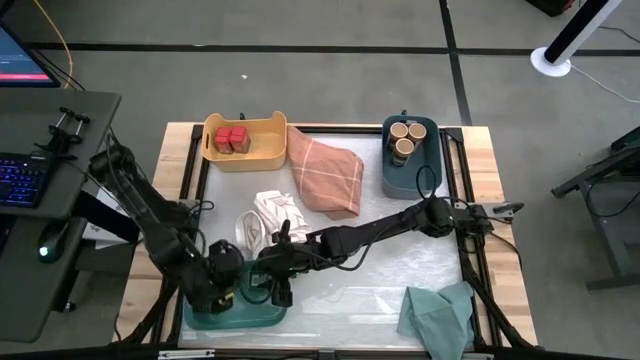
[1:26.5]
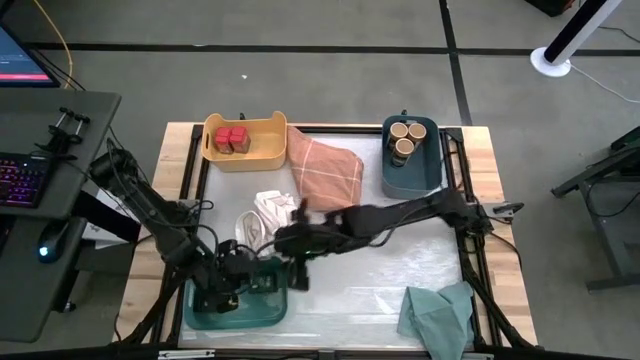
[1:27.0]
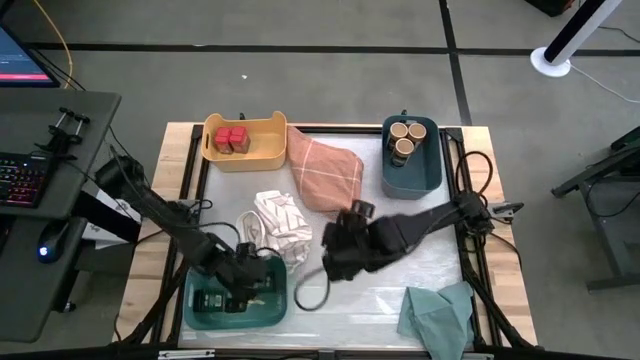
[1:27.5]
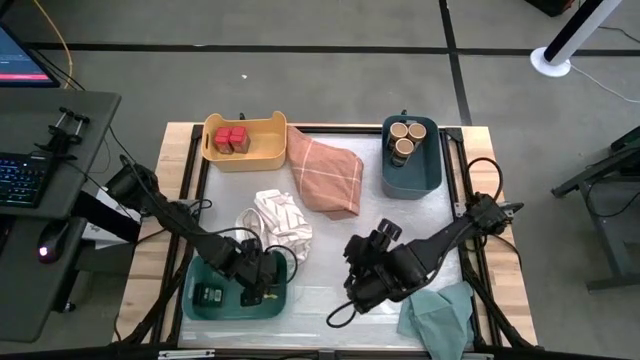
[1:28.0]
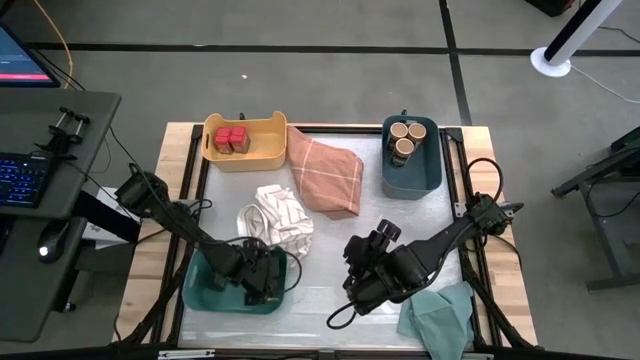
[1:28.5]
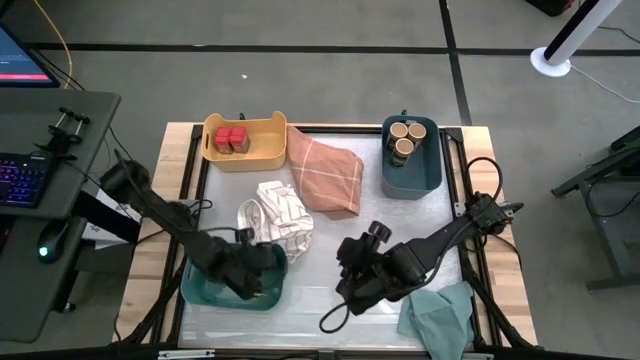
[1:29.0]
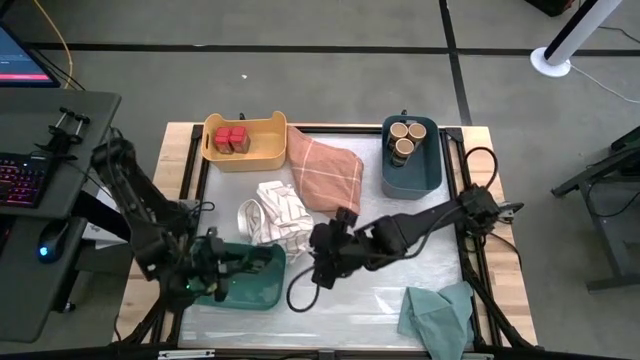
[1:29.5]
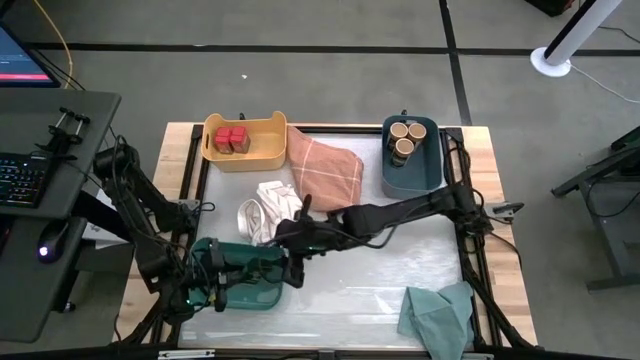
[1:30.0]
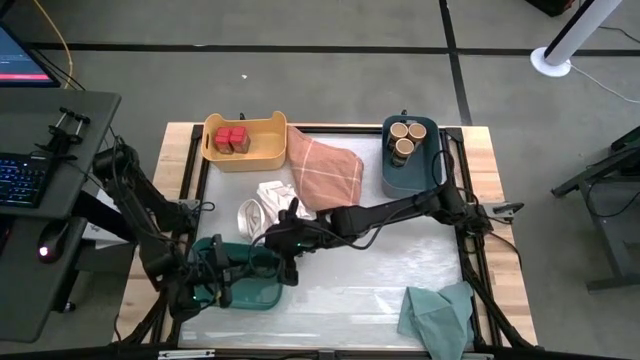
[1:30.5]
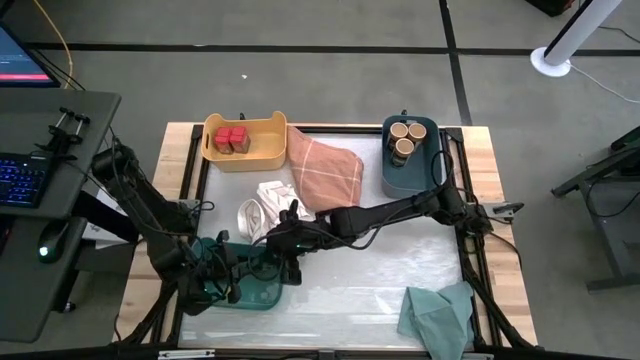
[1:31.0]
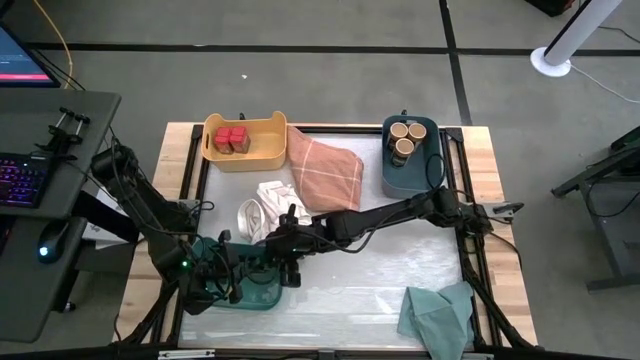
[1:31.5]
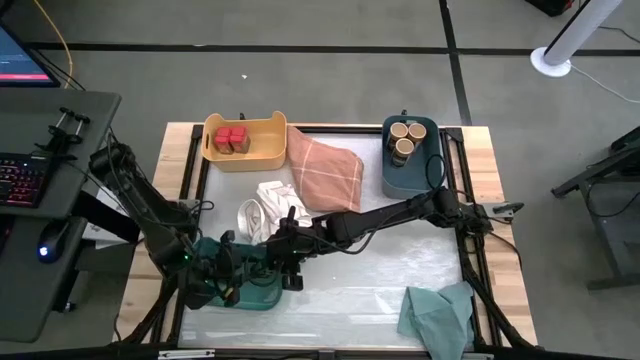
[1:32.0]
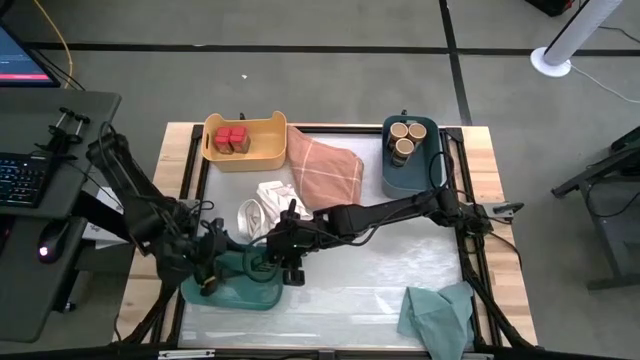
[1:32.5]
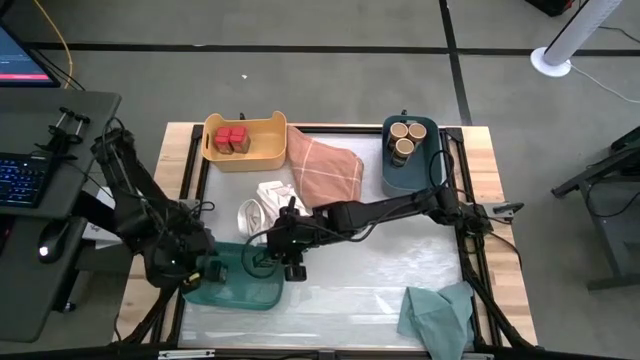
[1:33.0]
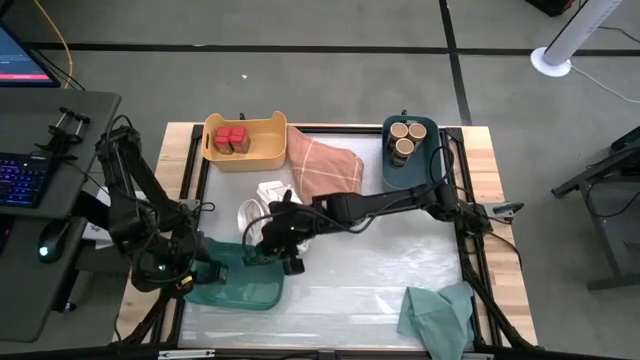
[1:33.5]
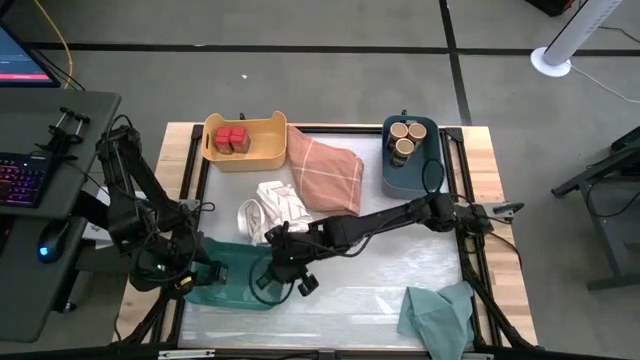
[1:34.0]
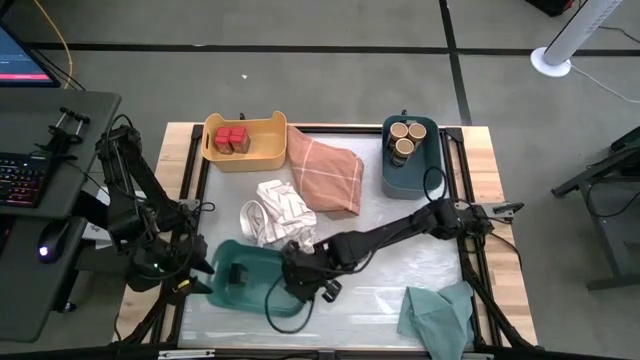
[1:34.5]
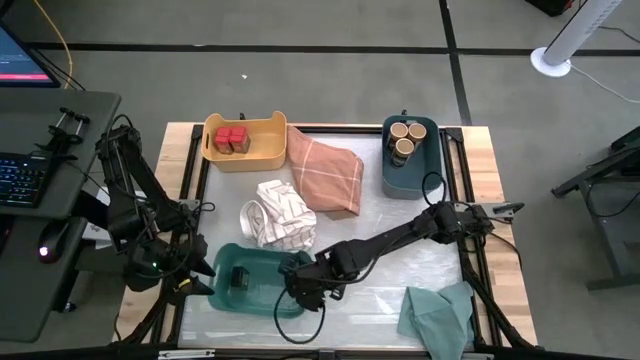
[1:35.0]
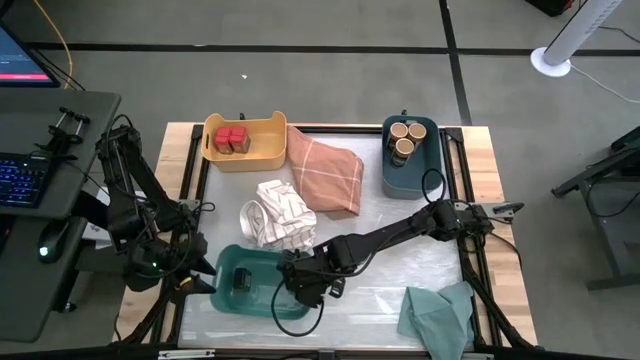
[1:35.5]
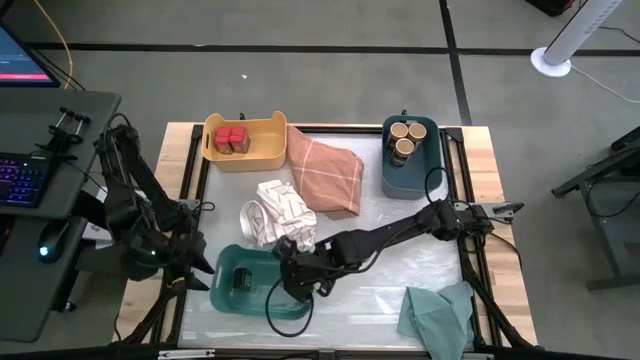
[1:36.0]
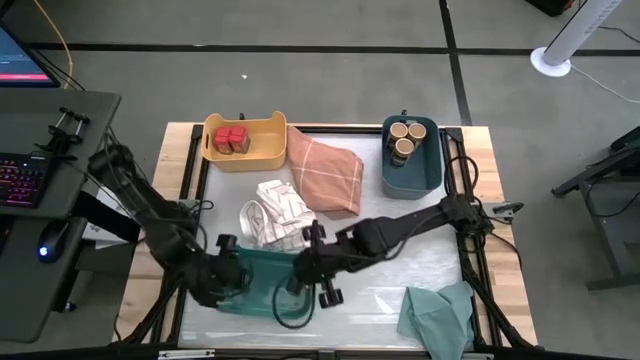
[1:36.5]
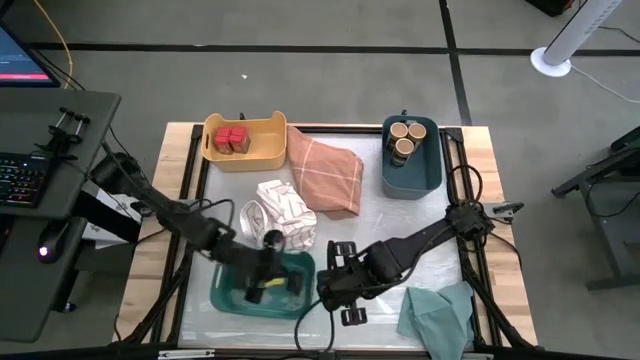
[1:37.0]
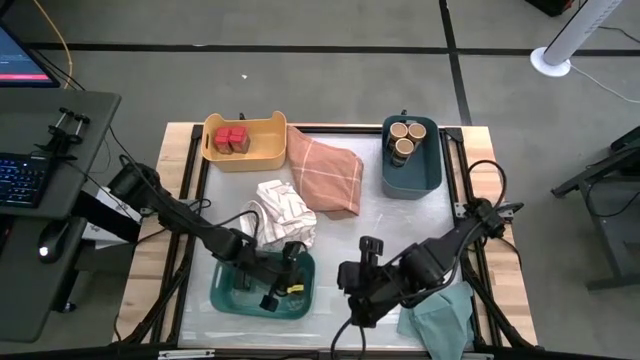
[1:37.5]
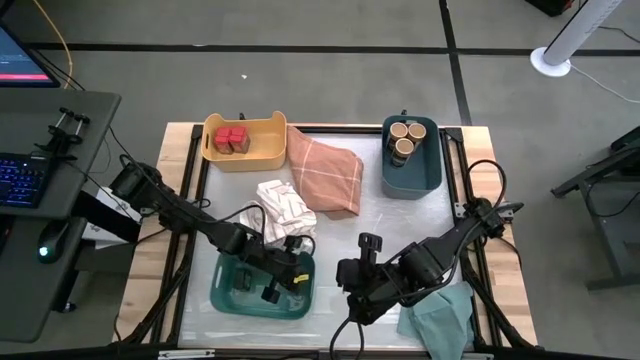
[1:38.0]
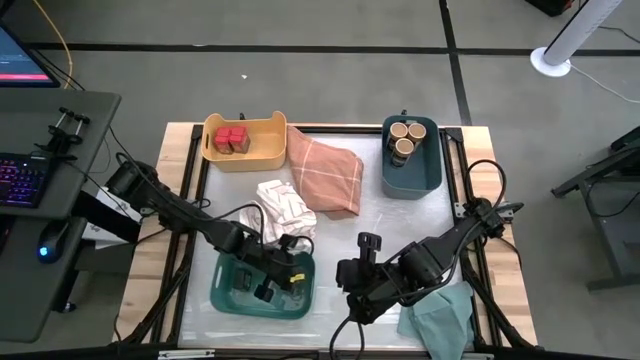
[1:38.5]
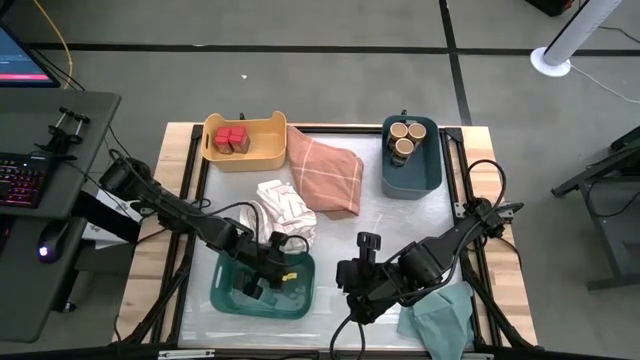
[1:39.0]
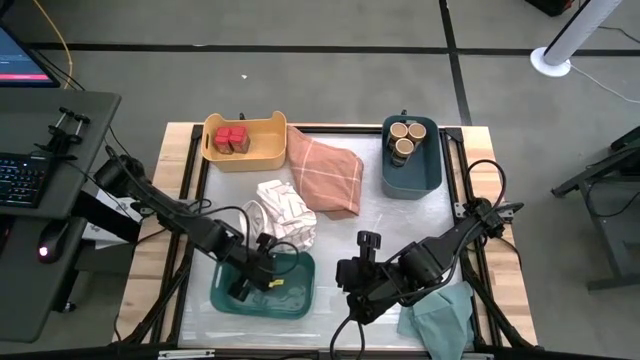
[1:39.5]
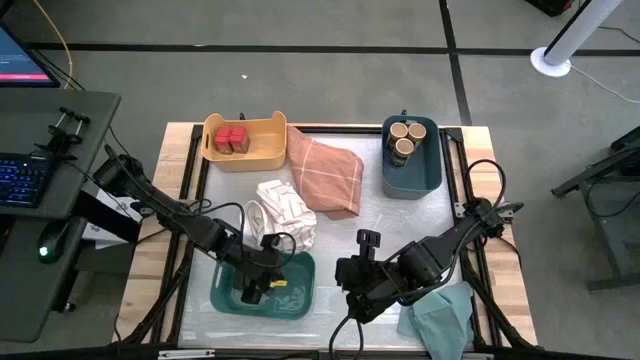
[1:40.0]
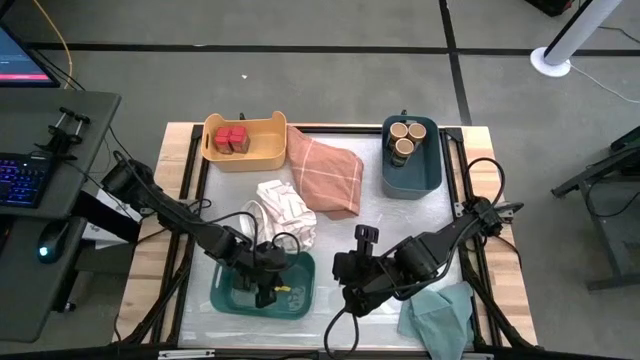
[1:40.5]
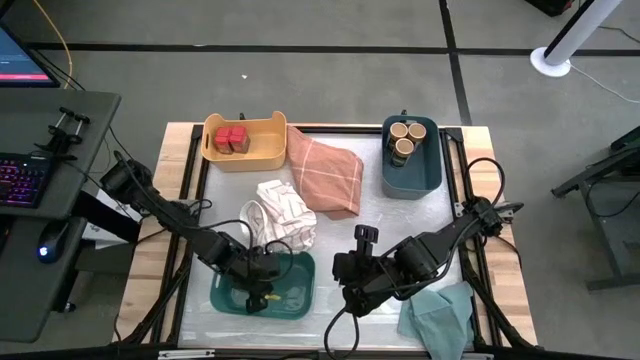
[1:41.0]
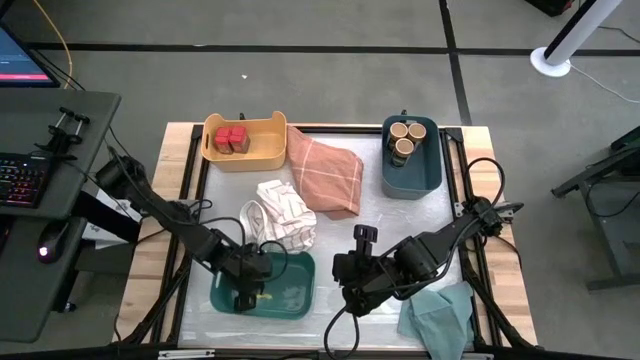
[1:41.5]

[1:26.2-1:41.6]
Task: Sort spices by type
Put the black seasoning can into the green bin

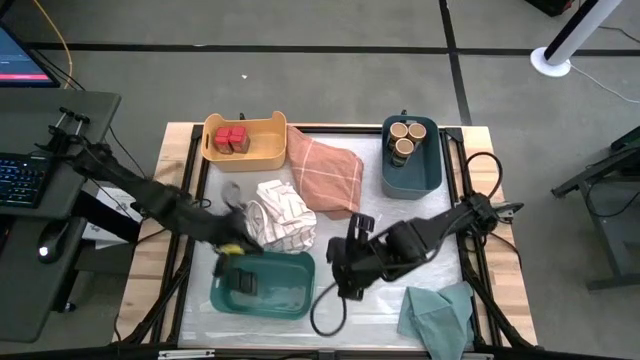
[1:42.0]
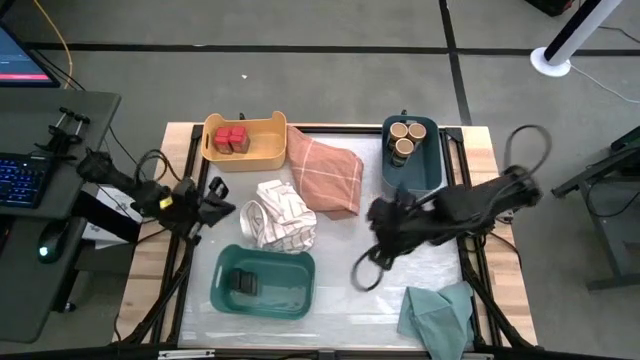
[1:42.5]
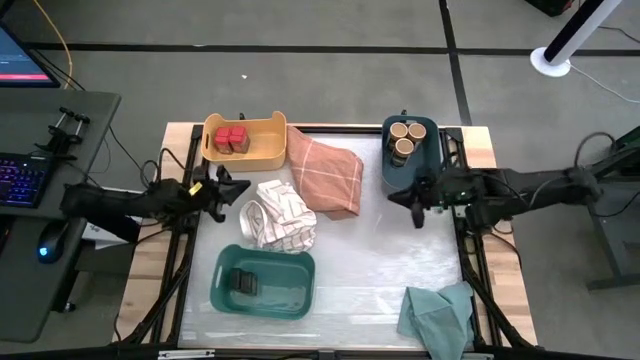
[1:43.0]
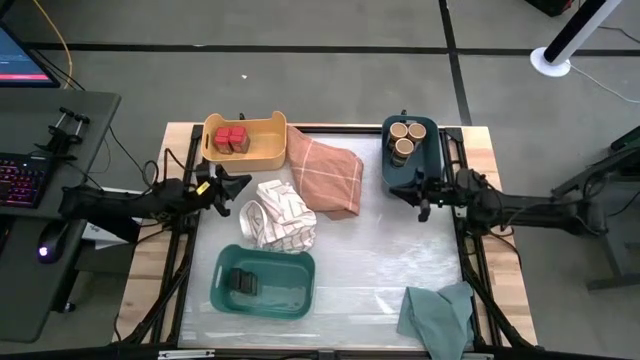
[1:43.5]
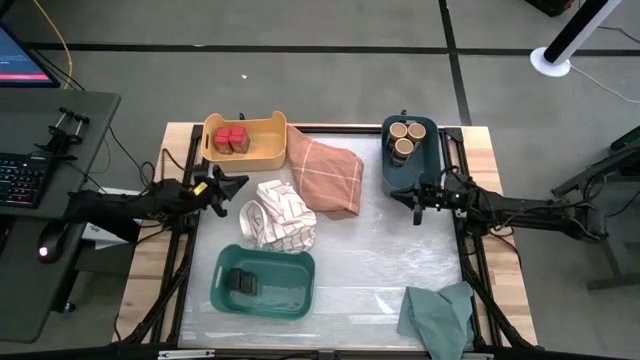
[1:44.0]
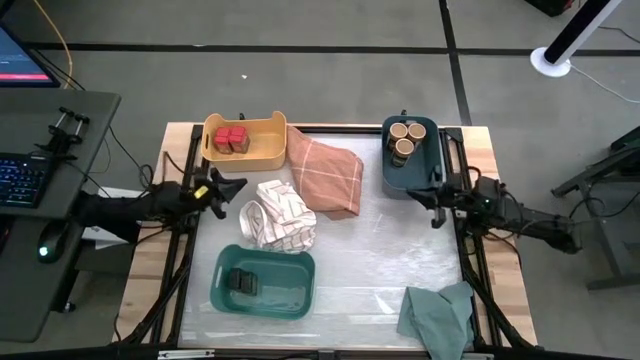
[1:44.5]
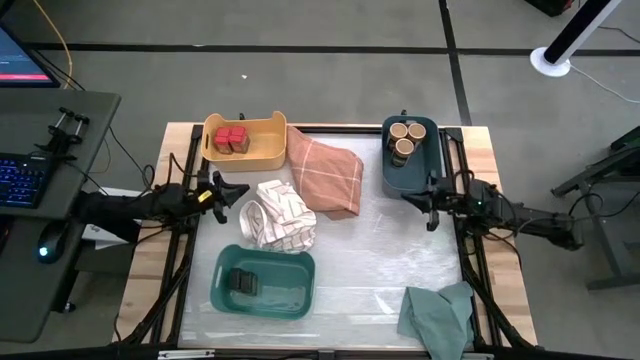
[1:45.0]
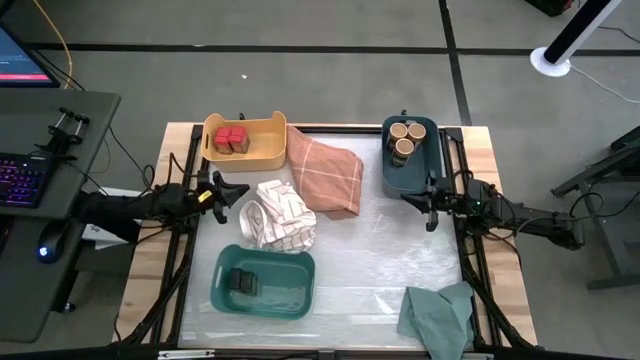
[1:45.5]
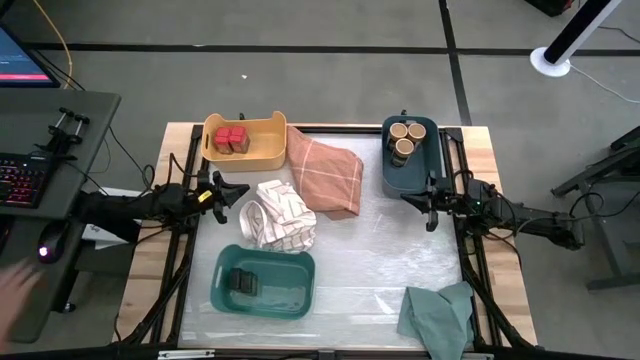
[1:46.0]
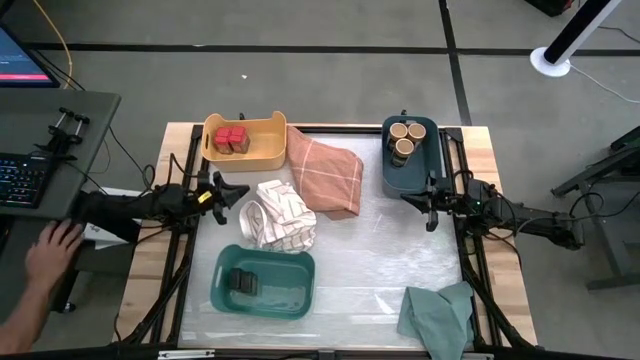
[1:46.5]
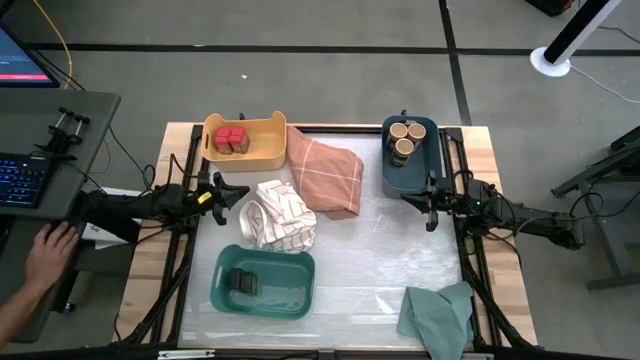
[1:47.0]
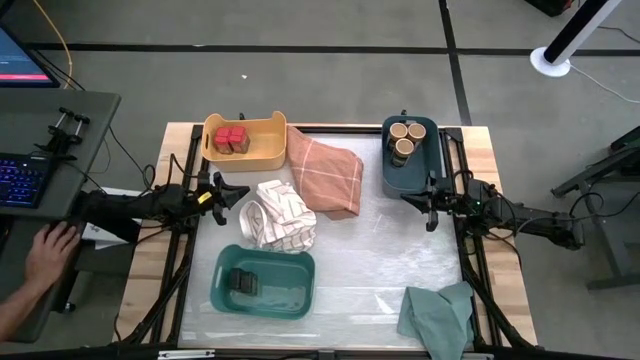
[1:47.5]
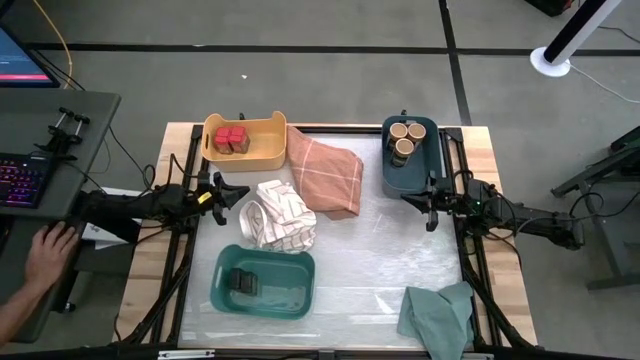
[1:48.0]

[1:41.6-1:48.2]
Return to Home Position
